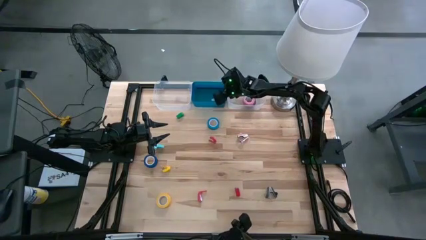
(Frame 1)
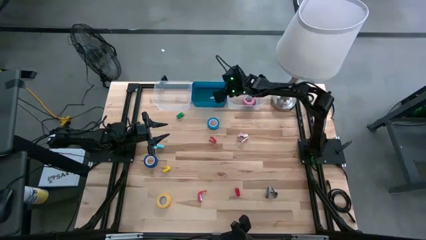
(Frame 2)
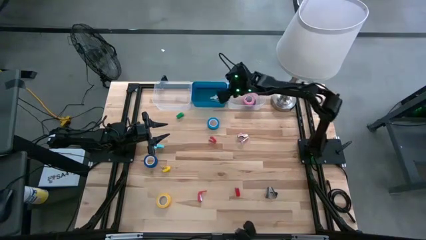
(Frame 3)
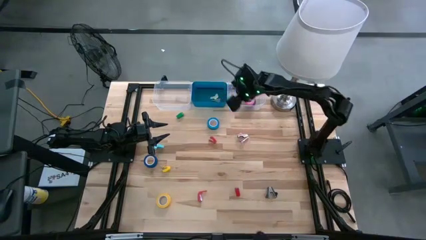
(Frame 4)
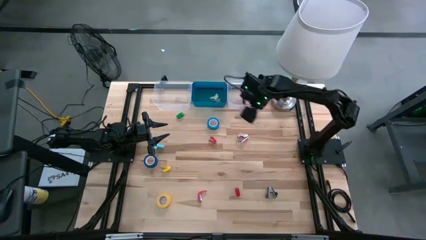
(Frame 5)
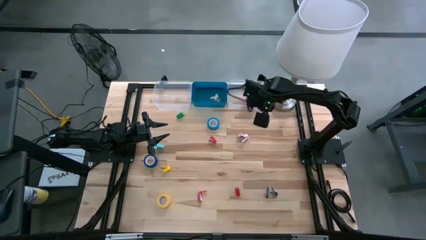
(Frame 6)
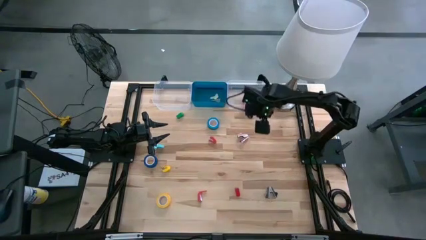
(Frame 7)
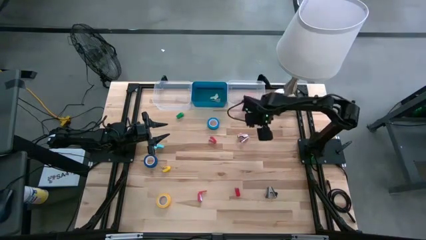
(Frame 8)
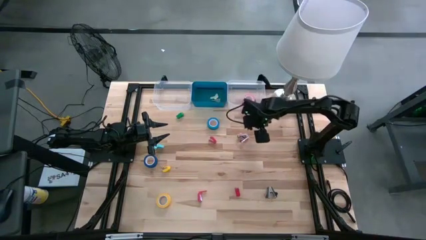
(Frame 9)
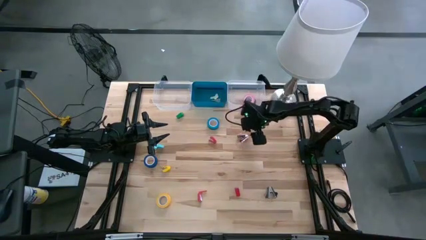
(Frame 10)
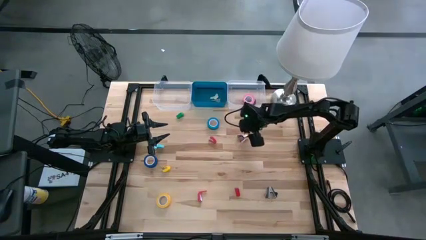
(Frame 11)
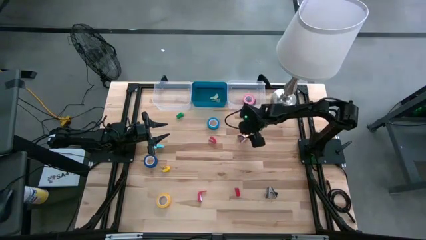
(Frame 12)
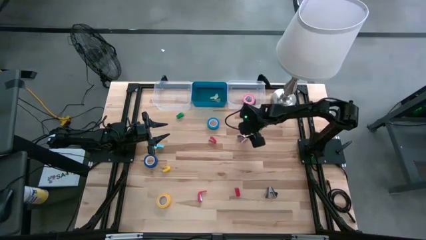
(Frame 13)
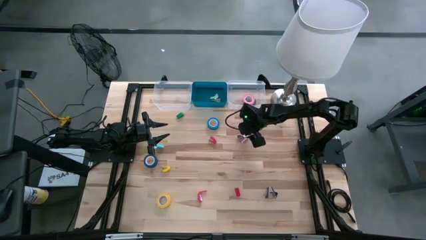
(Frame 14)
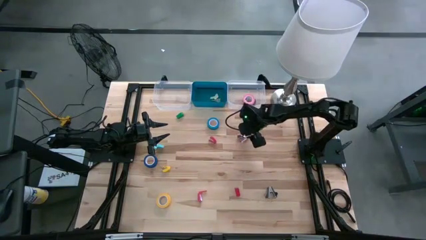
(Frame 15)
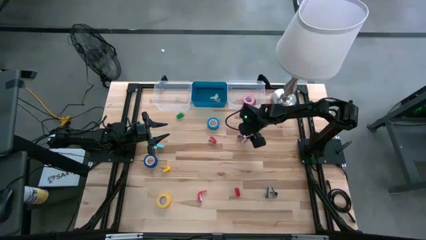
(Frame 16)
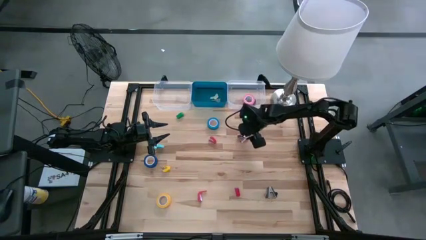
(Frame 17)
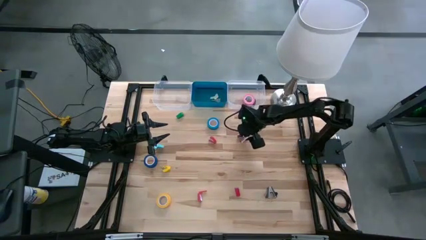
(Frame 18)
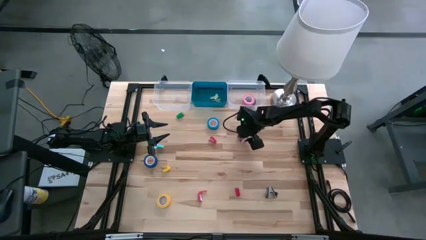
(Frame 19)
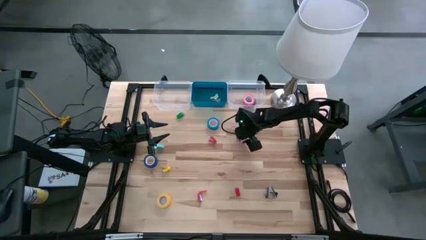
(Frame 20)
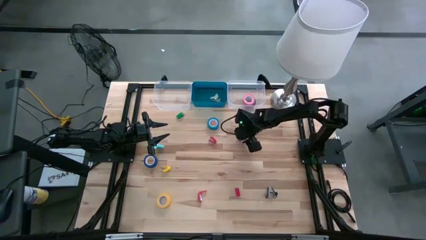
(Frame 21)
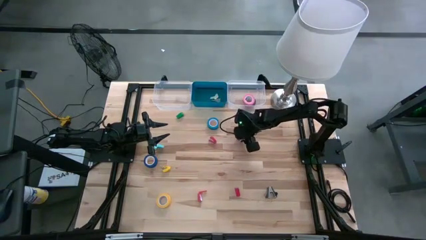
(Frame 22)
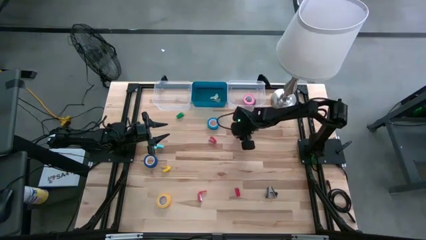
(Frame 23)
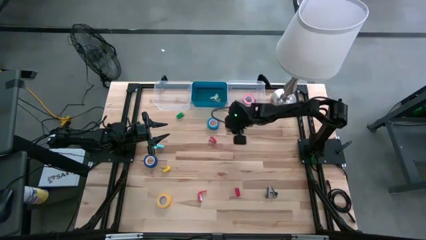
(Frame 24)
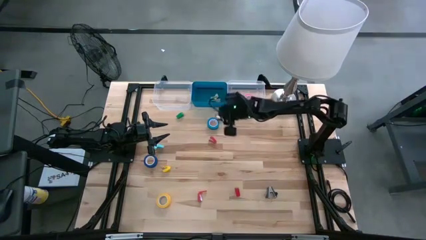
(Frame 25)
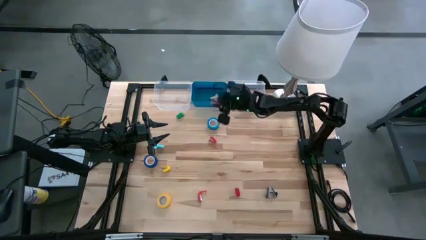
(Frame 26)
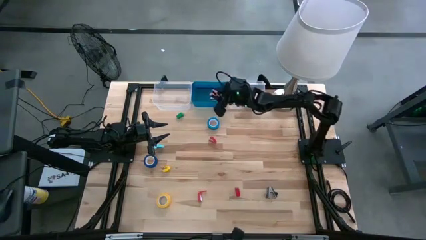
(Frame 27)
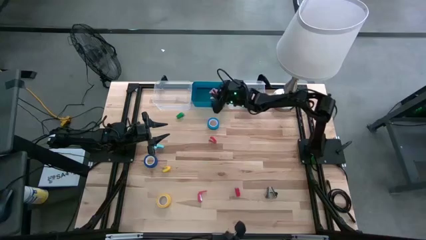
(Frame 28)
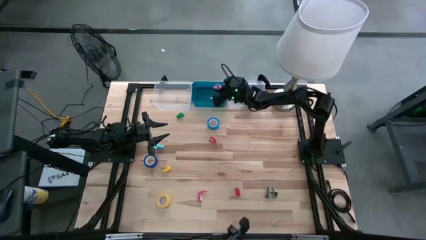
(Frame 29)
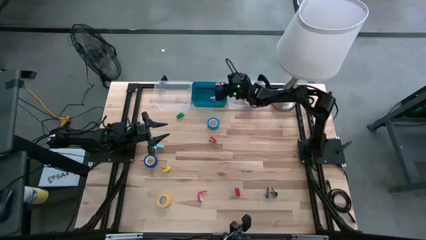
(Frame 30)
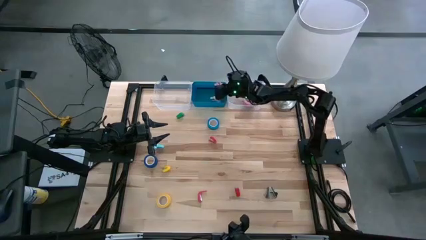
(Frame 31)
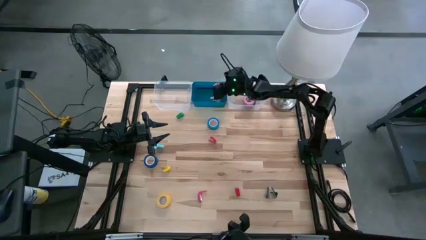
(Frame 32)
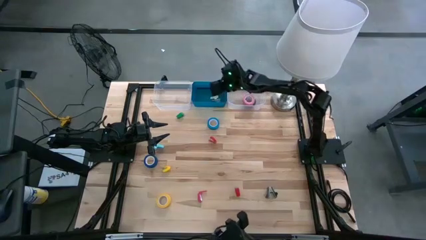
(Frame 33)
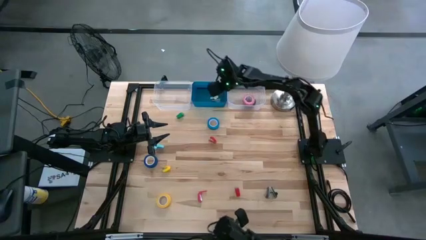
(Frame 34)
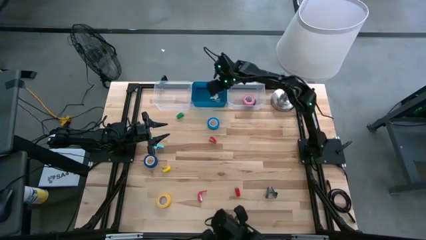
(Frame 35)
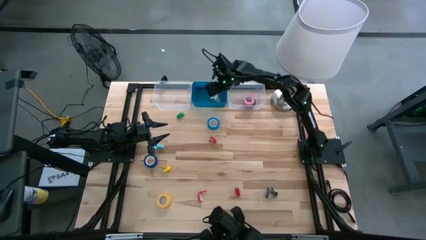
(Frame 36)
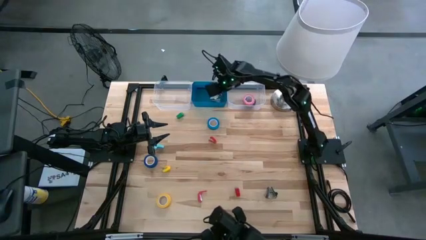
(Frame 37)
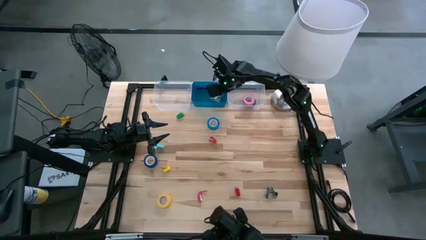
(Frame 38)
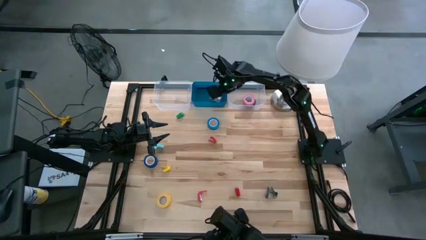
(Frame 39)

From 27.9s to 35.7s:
Task: Pick and place Stapler, Stapler remover, tape
Put the pink staple remover into the blue bin

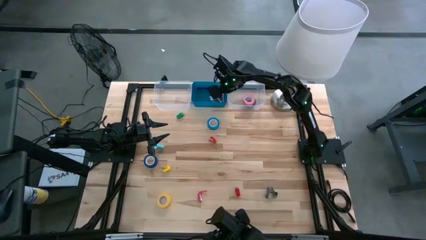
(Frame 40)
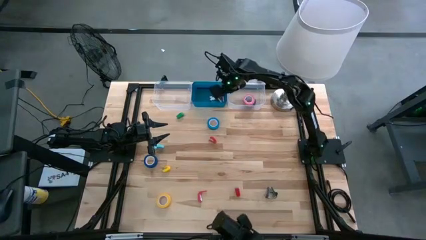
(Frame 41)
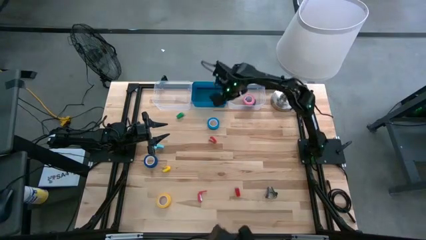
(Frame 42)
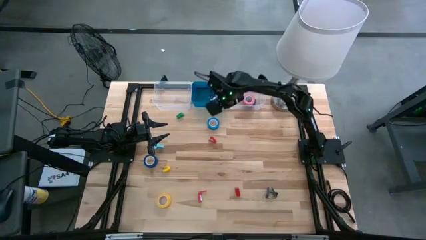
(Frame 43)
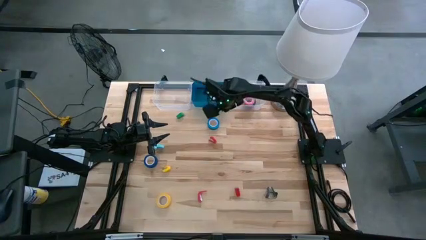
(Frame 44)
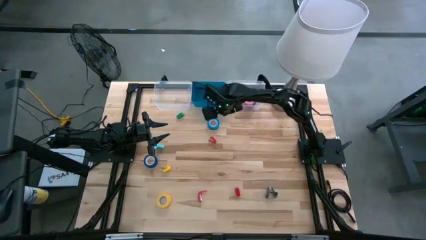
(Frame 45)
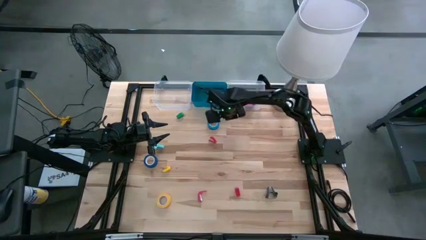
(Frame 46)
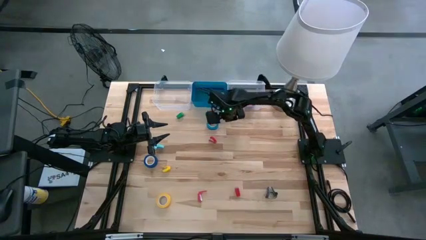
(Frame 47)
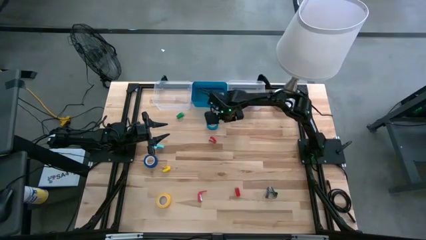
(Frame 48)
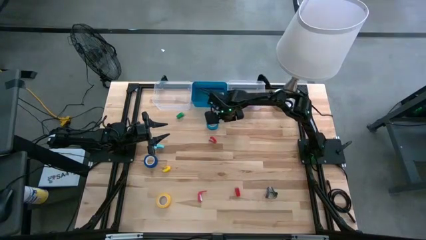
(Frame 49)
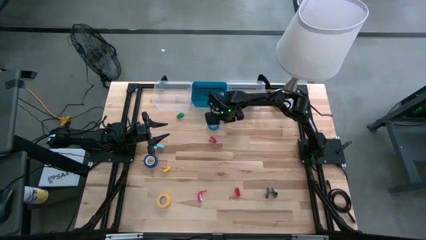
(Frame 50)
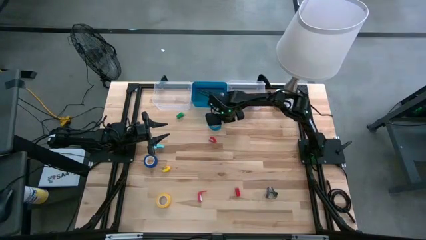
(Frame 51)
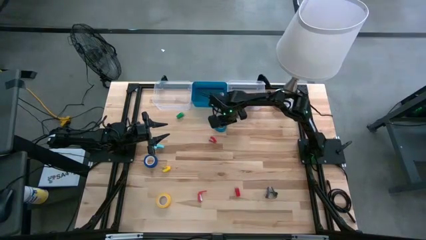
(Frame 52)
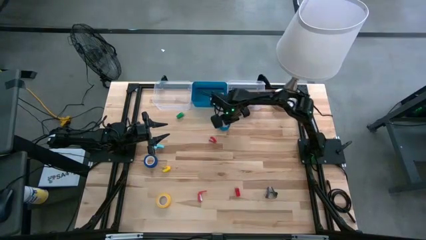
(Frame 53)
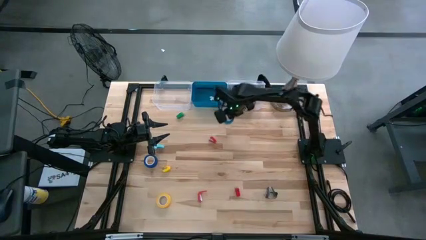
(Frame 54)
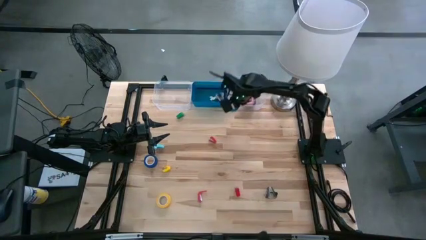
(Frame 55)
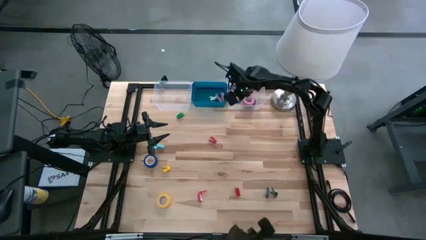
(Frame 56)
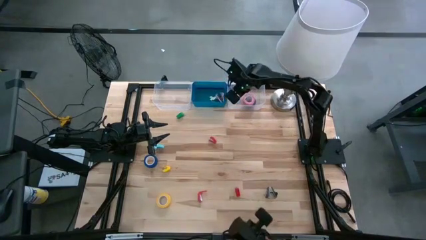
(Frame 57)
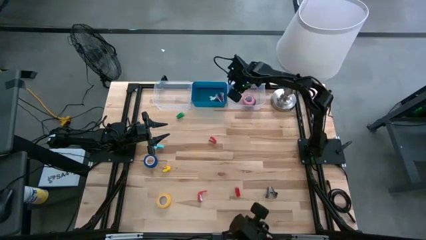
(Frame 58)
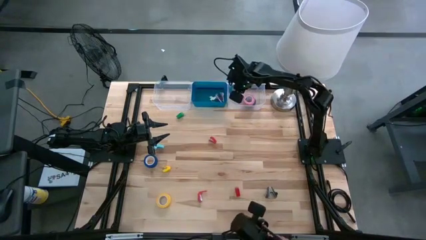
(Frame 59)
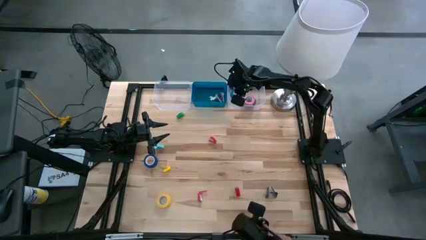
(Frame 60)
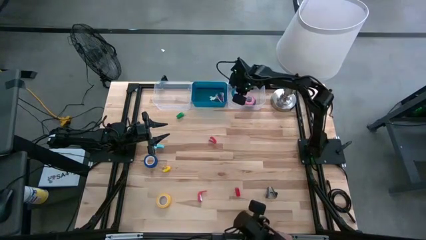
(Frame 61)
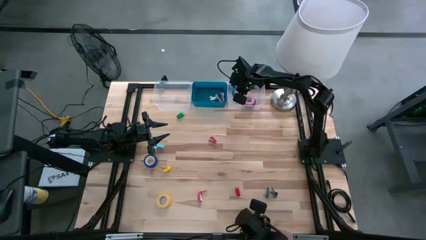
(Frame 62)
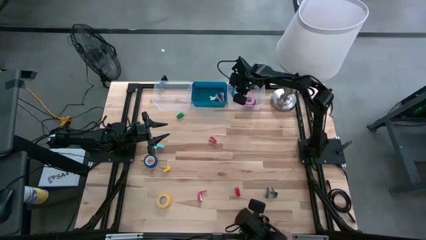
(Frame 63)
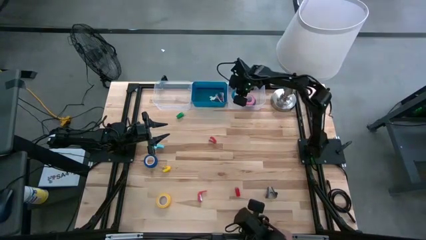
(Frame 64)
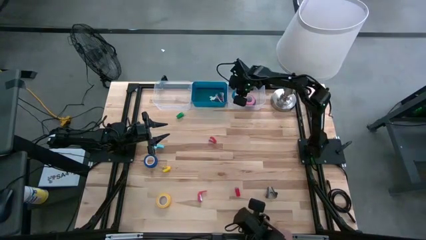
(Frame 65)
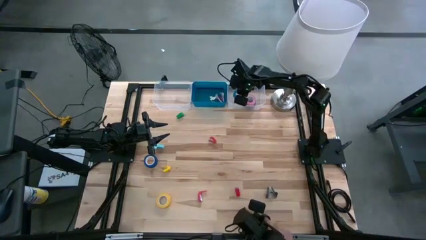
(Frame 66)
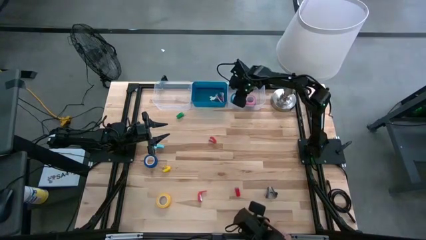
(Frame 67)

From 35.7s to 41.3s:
Put the blue tape into the right transparent bin

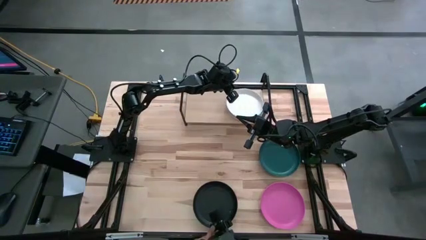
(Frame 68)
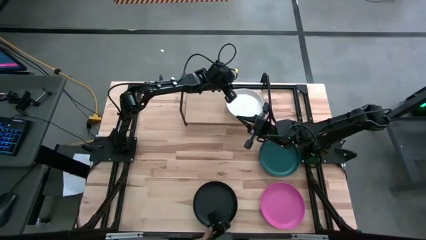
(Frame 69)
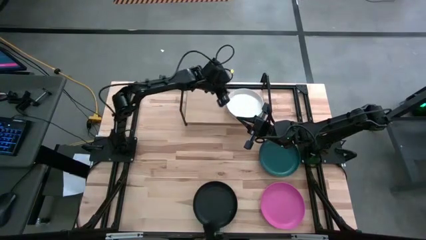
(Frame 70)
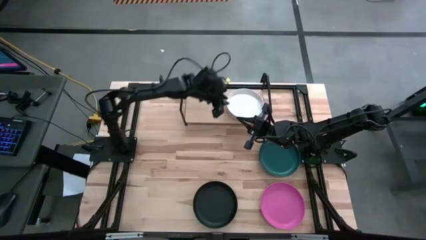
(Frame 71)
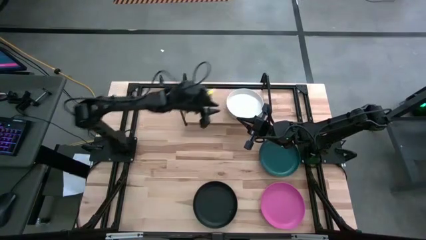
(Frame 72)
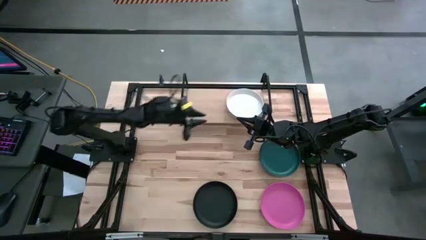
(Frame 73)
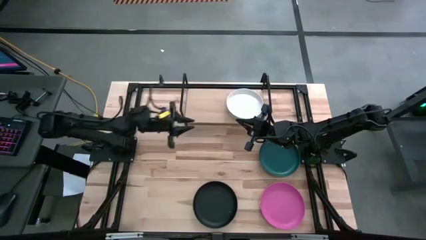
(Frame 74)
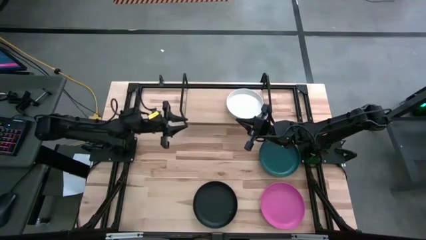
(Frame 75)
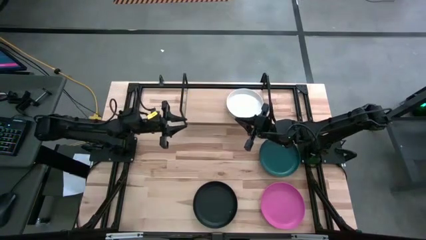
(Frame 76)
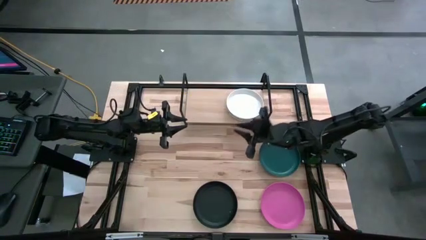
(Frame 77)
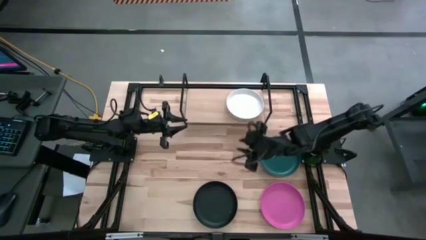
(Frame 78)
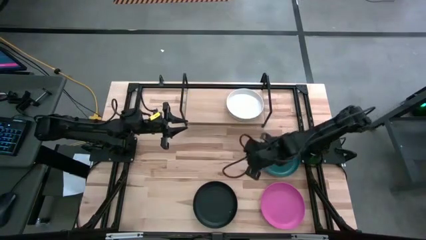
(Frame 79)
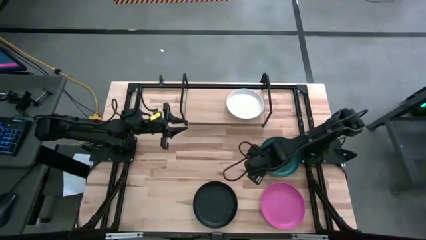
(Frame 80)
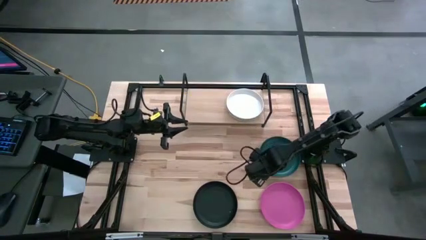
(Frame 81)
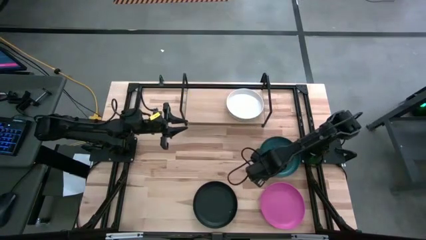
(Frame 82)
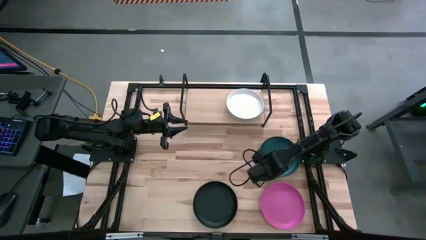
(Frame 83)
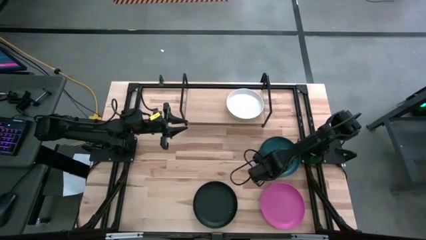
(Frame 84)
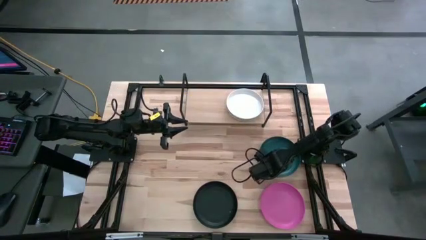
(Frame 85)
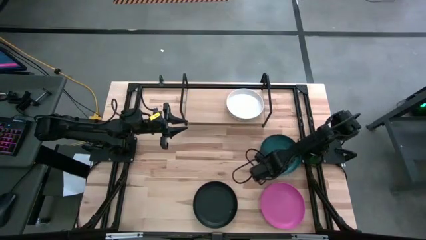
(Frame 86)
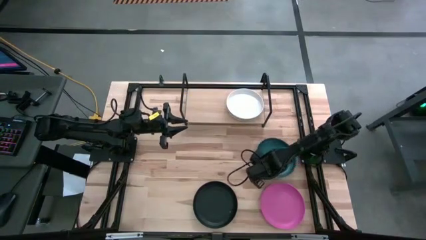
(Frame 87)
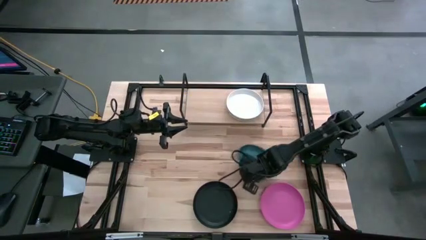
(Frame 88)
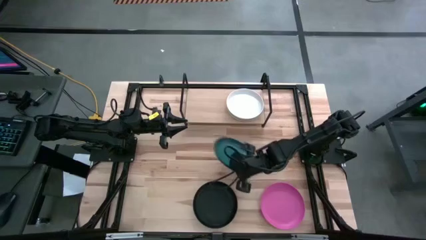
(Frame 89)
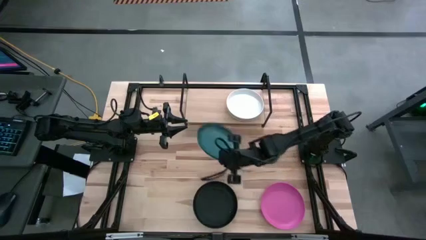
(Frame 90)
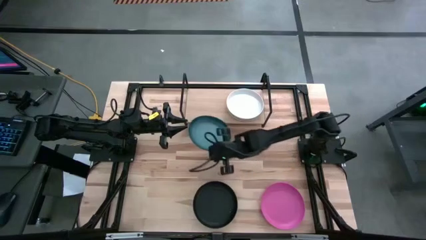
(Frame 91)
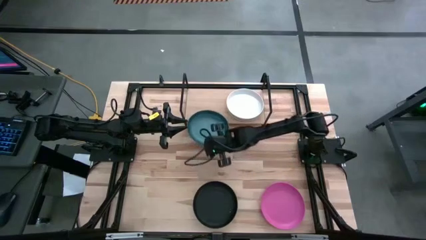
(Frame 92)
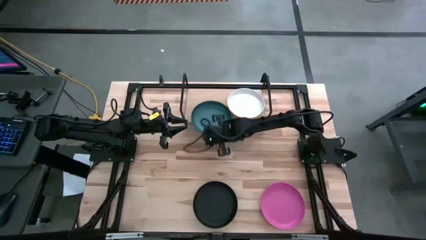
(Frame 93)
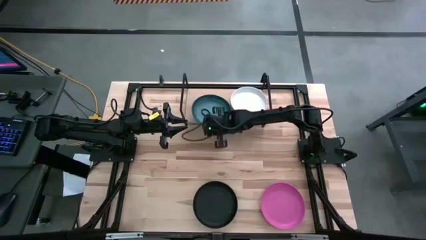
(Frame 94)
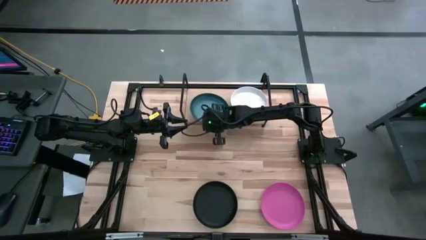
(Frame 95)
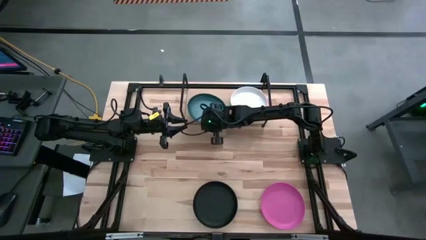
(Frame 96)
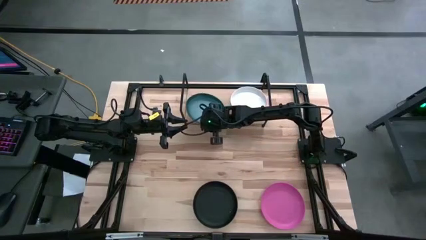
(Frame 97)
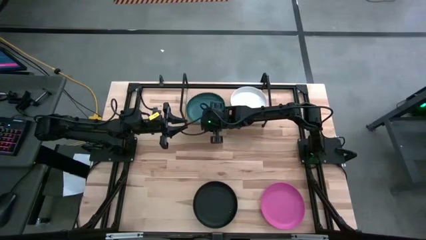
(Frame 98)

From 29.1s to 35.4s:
Task: Place and stack plates onto a shelf
Put the dark green plate on the shelf
